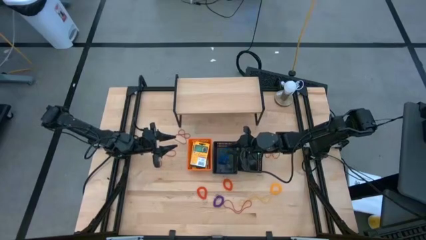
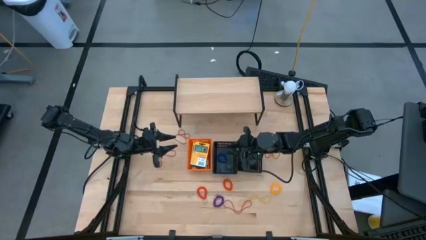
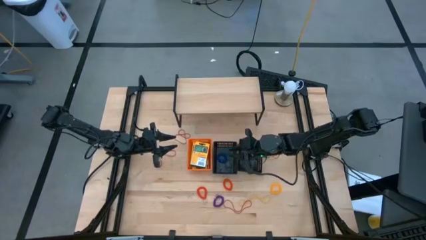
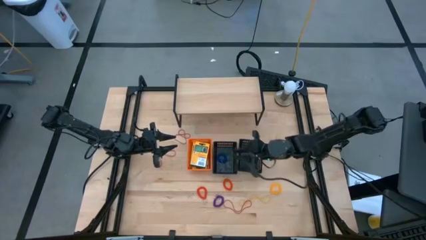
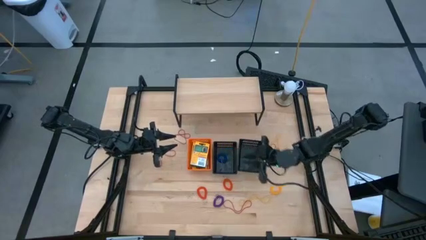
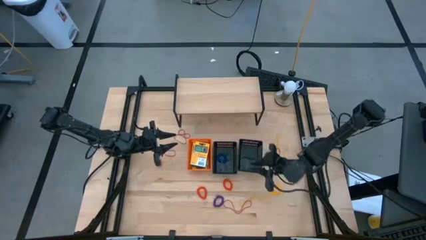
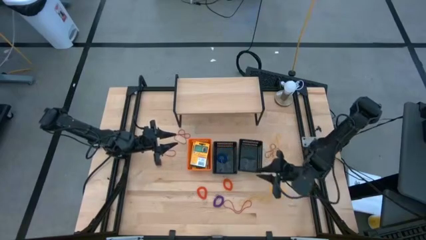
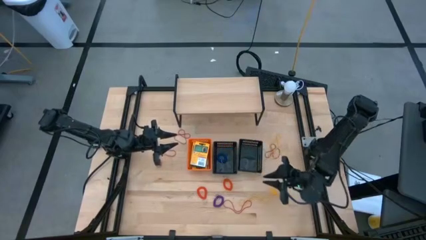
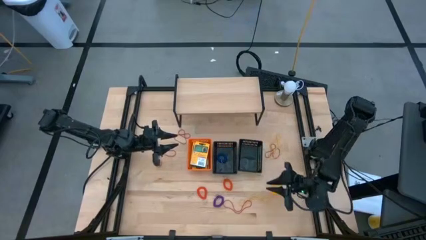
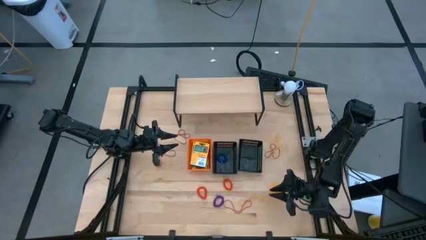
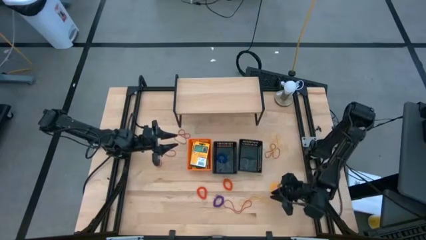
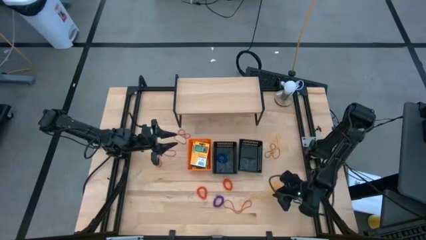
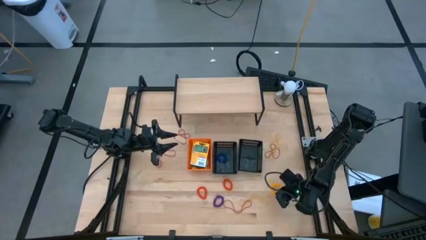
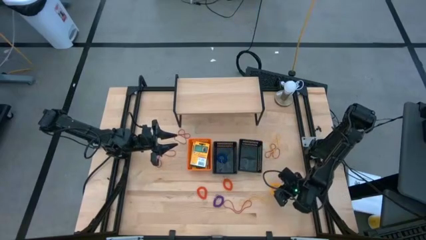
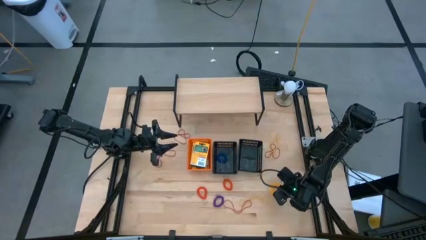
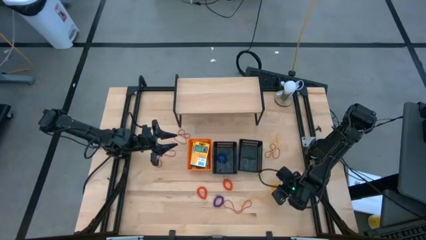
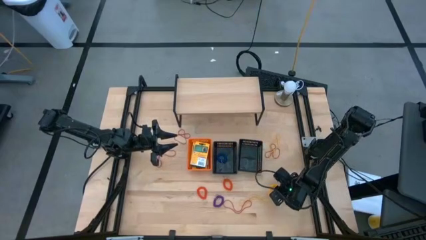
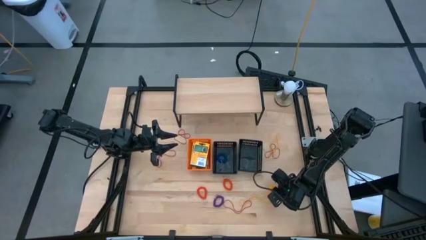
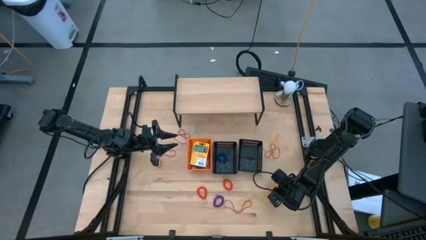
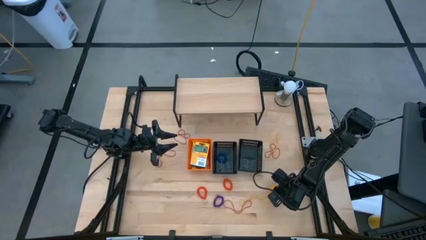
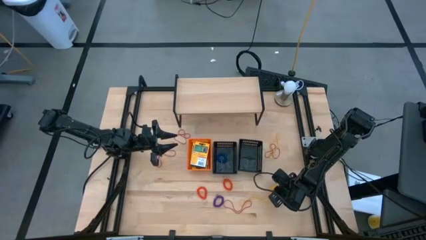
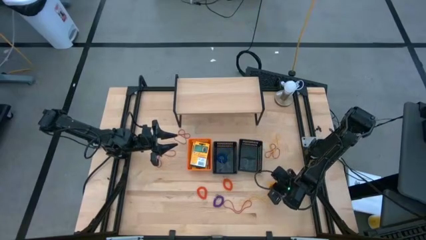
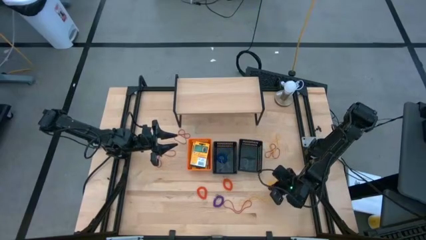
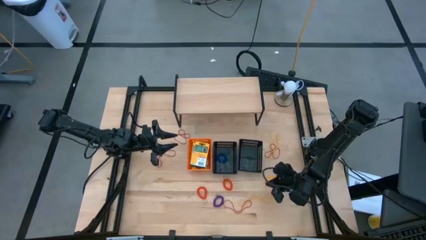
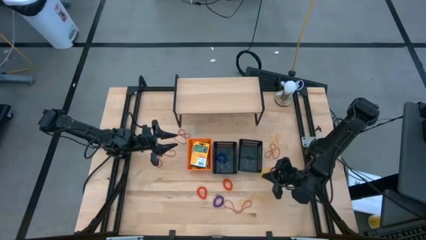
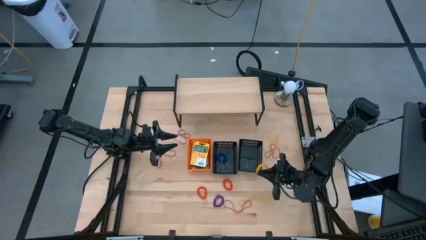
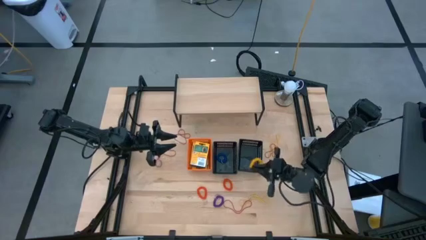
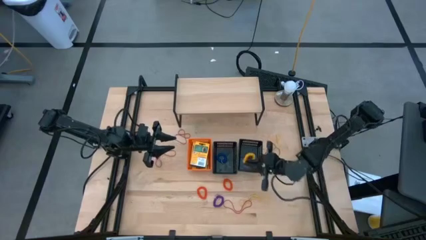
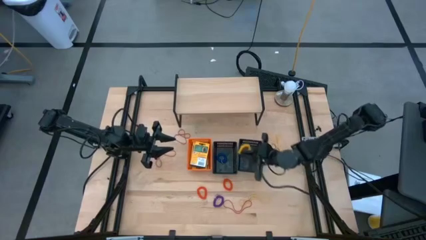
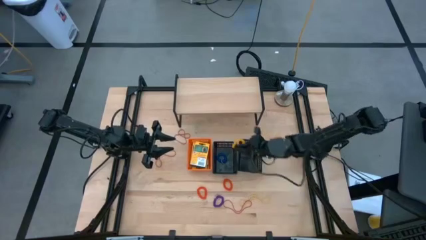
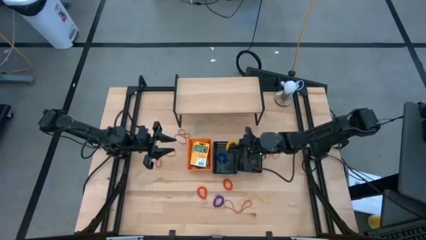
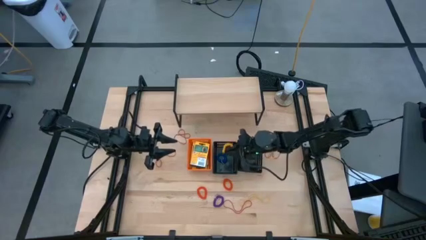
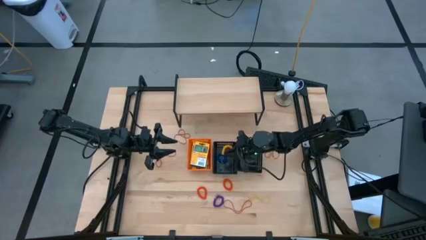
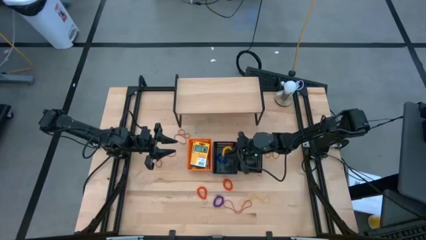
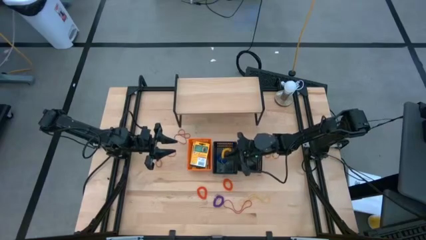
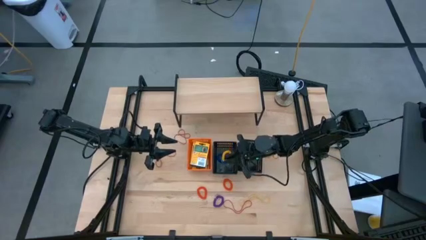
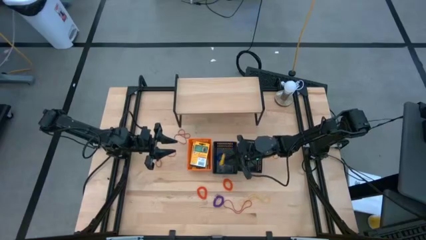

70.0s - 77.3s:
Task: Pick & Place Office Desk Supplies
Put the yellow spring keychain into the left black bin
